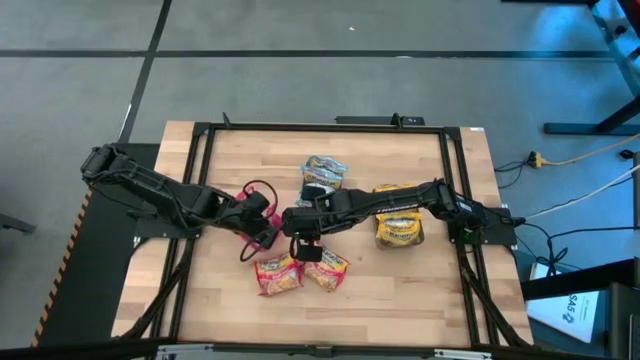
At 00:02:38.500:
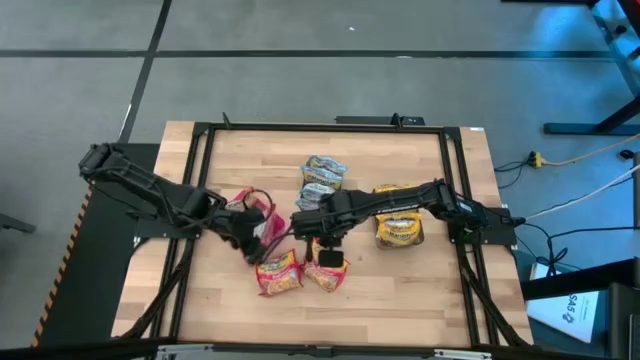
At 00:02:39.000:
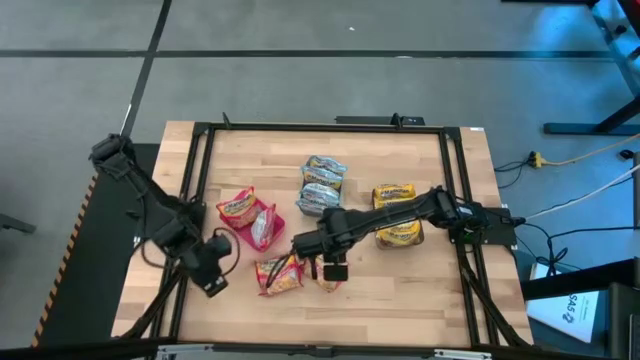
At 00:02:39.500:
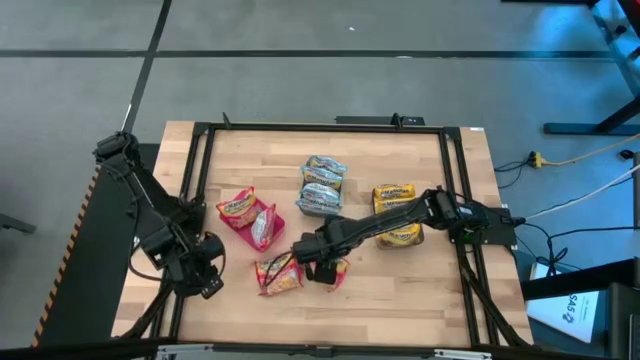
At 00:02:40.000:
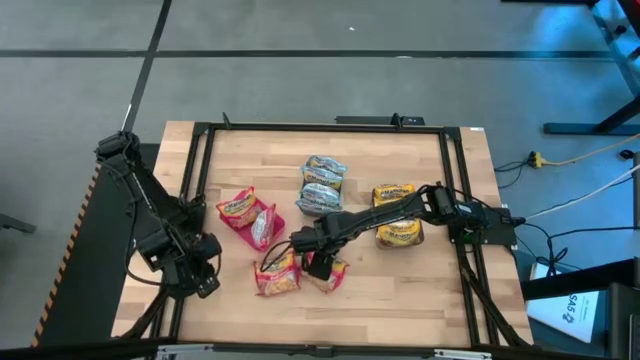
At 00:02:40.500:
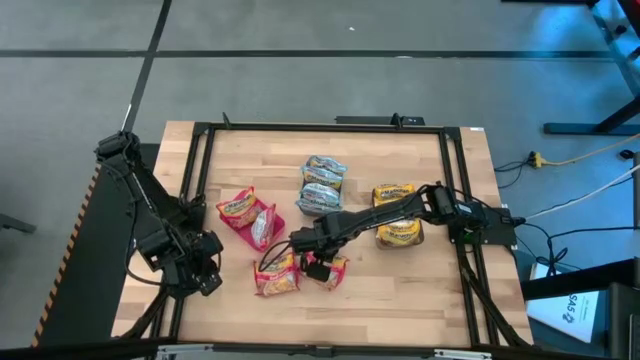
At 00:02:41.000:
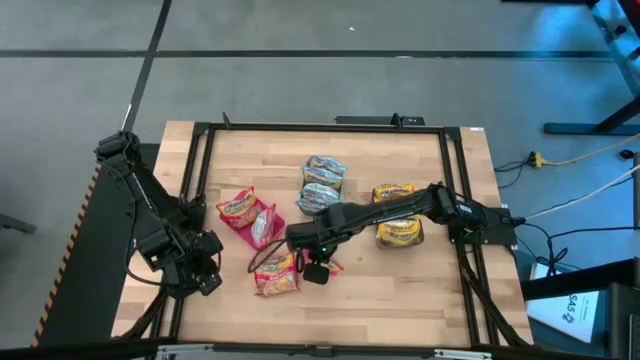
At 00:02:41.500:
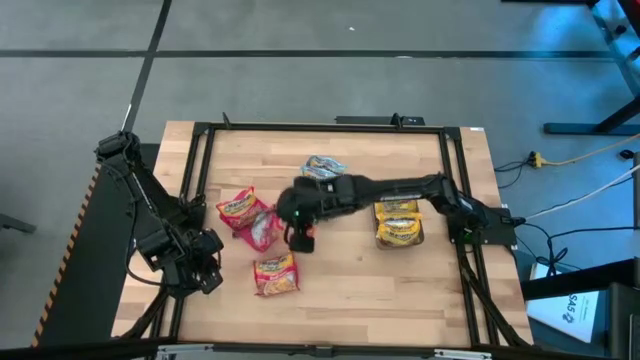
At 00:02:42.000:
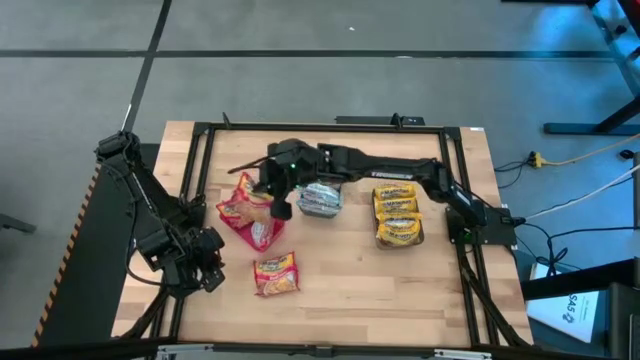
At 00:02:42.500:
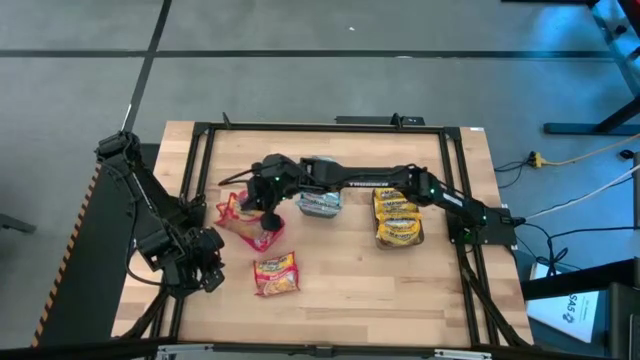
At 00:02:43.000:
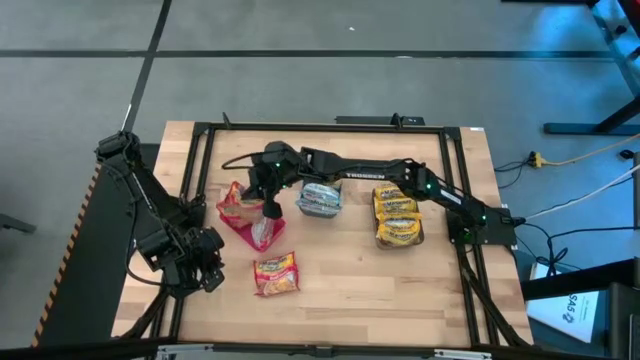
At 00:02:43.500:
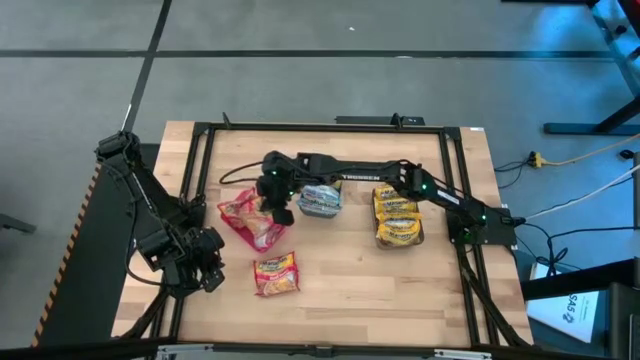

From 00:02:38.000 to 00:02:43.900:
Task: Sort Maruchan noodles
Put the red noodle pack into the red bin

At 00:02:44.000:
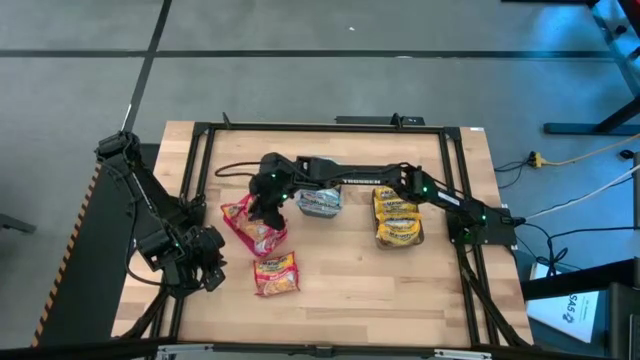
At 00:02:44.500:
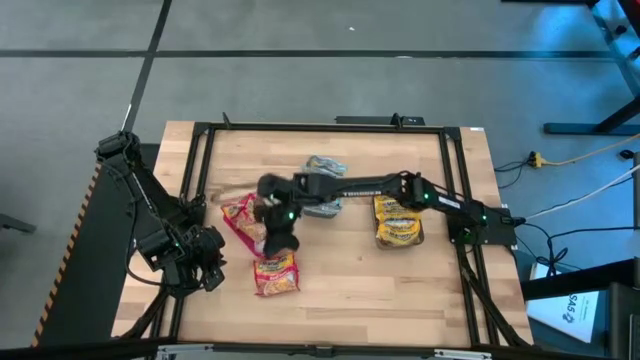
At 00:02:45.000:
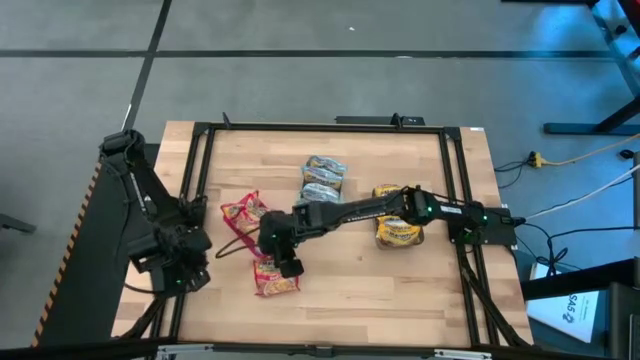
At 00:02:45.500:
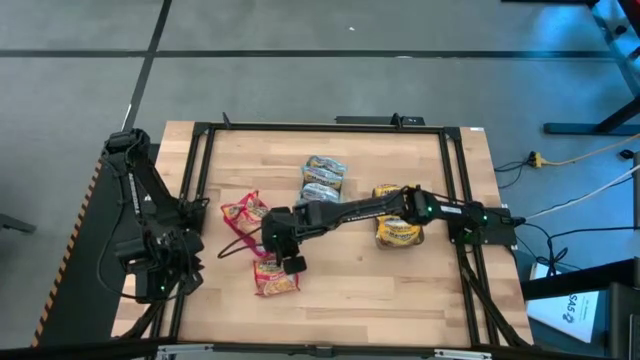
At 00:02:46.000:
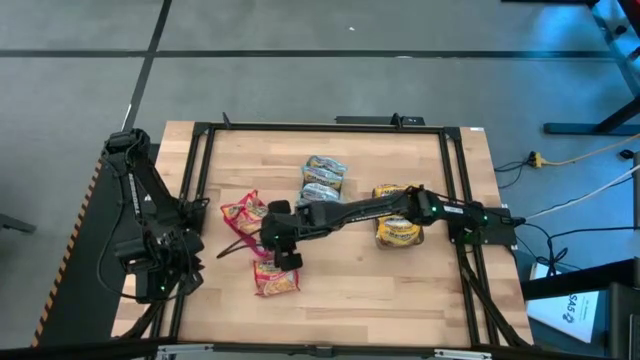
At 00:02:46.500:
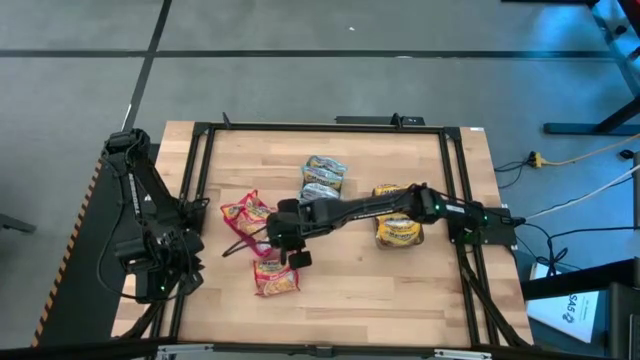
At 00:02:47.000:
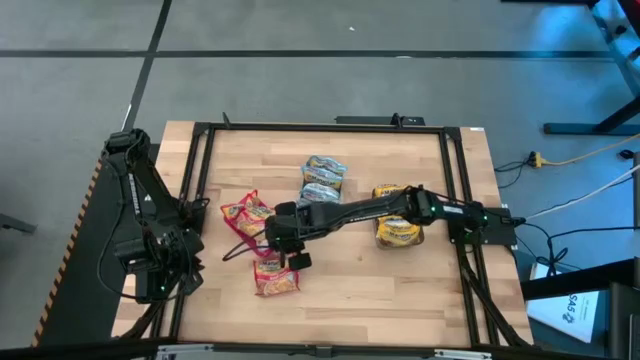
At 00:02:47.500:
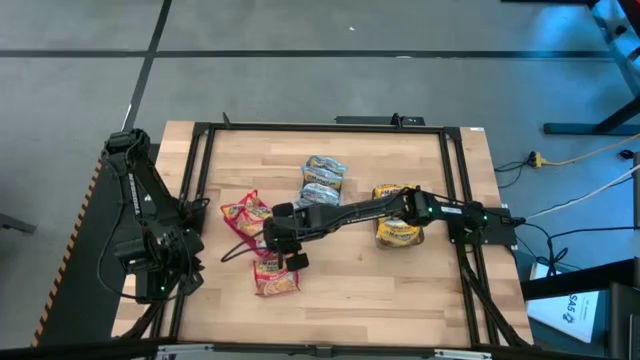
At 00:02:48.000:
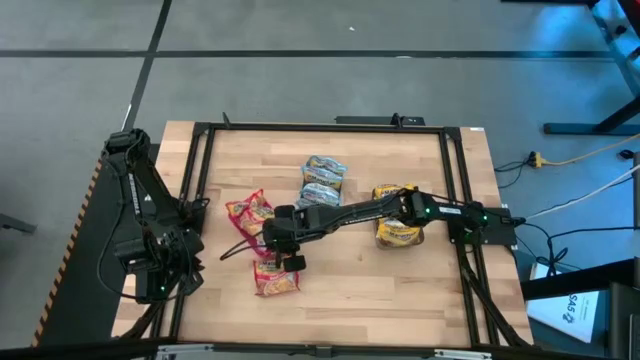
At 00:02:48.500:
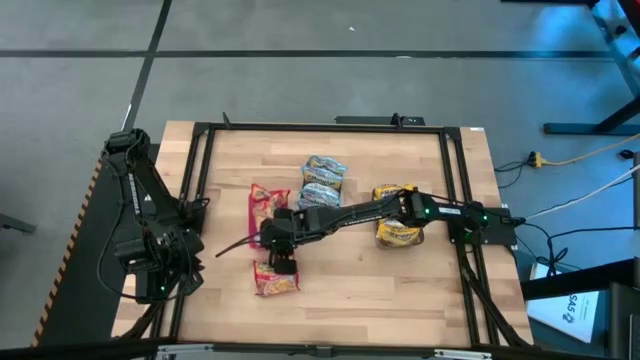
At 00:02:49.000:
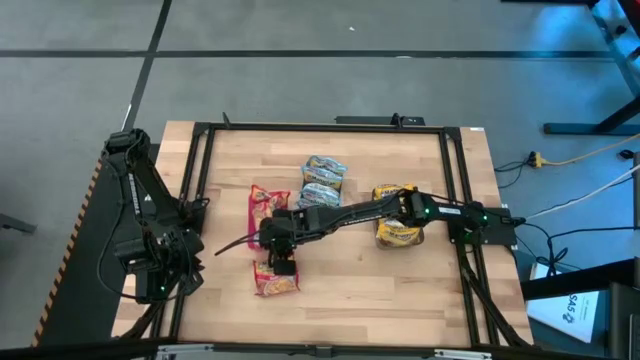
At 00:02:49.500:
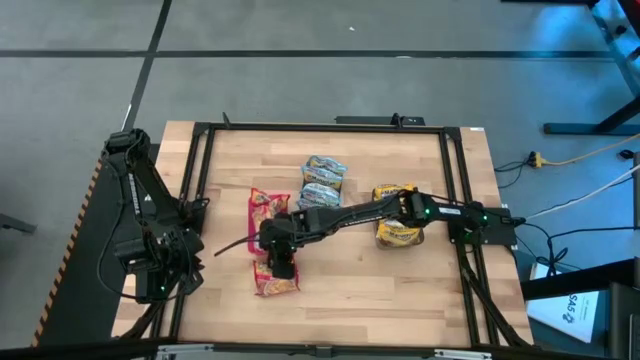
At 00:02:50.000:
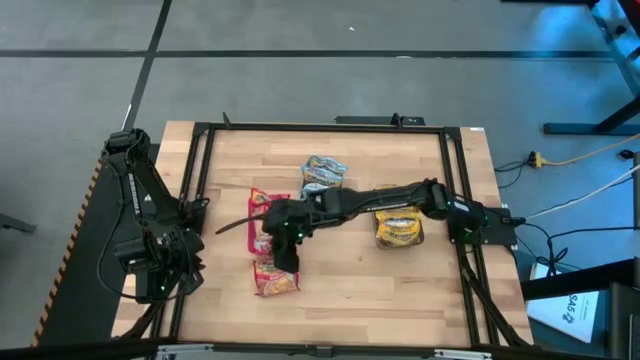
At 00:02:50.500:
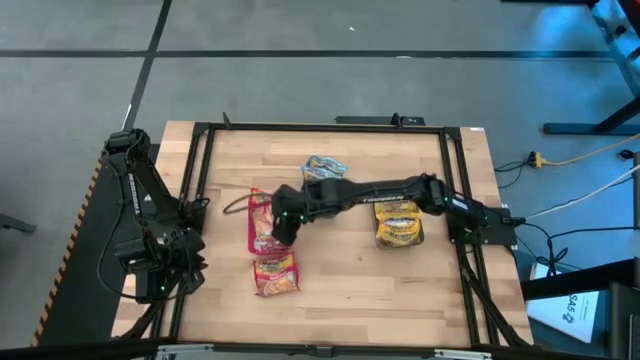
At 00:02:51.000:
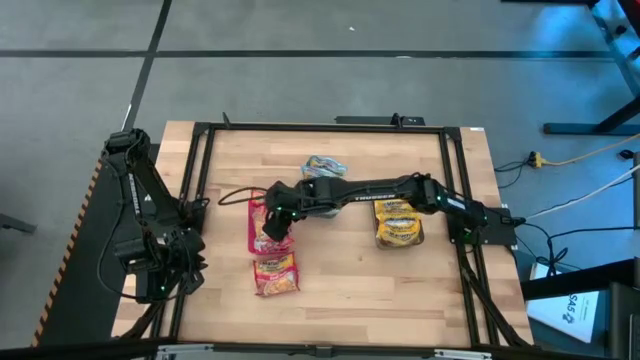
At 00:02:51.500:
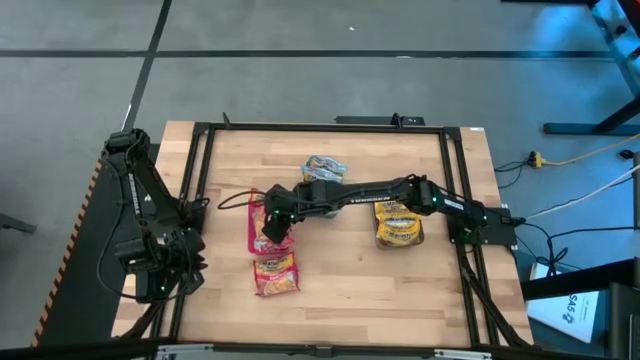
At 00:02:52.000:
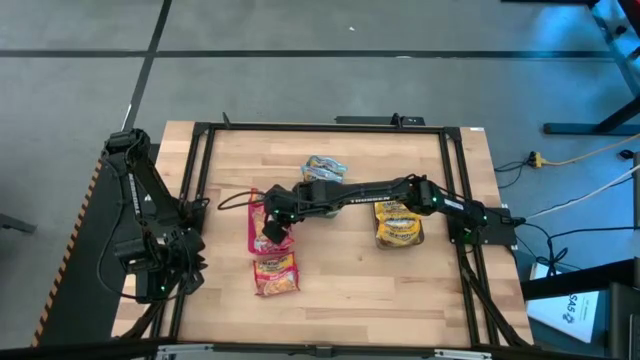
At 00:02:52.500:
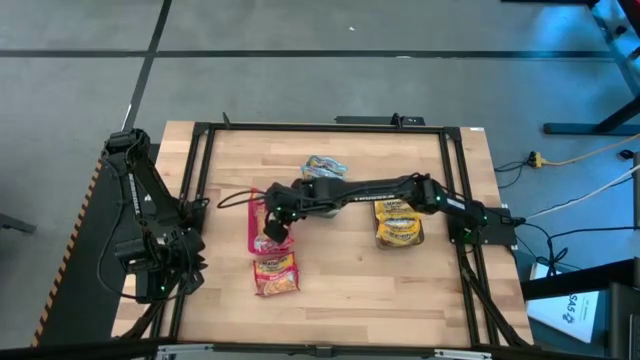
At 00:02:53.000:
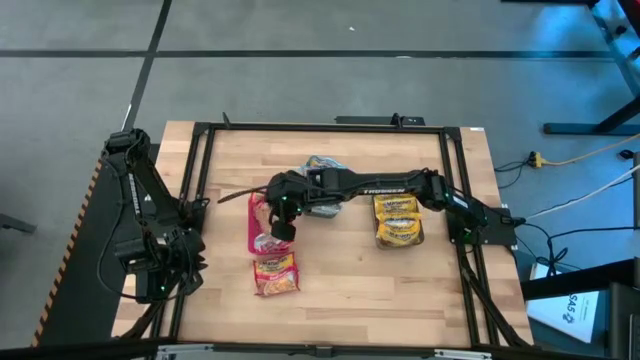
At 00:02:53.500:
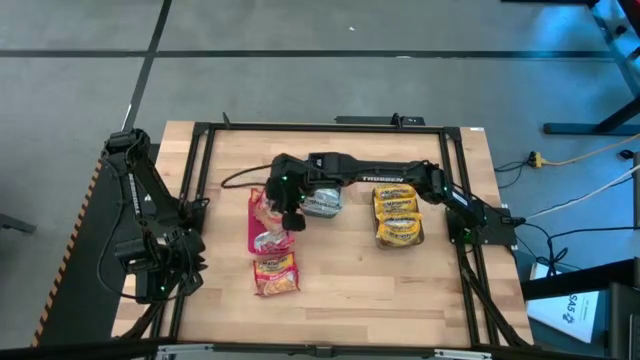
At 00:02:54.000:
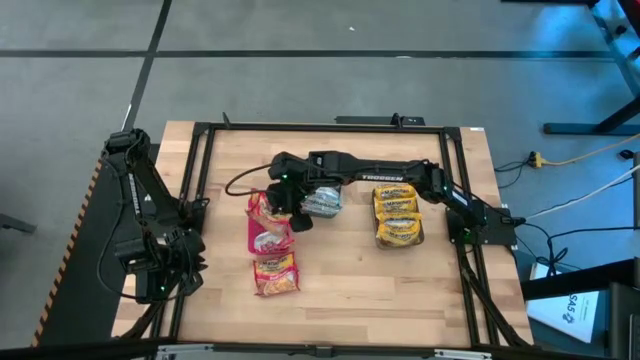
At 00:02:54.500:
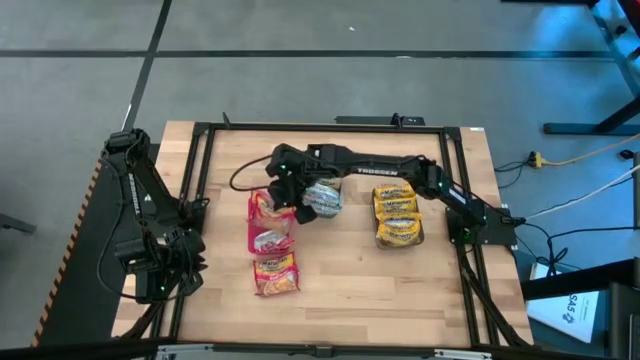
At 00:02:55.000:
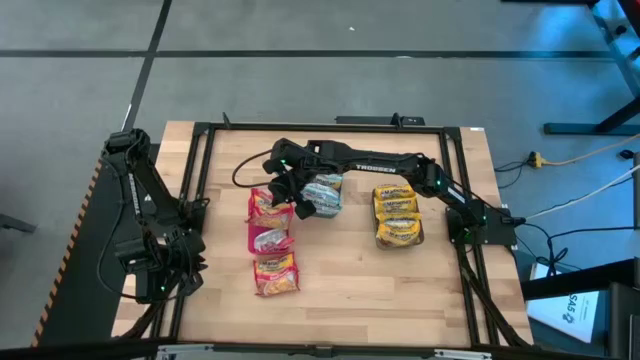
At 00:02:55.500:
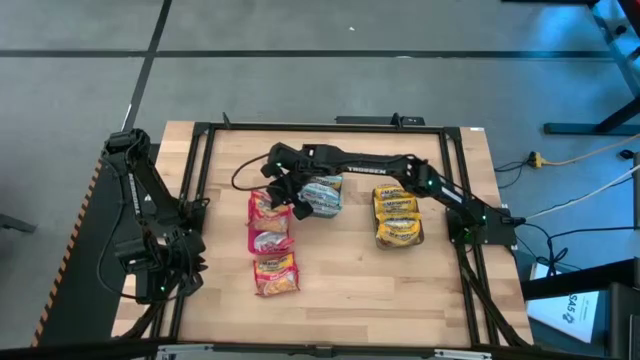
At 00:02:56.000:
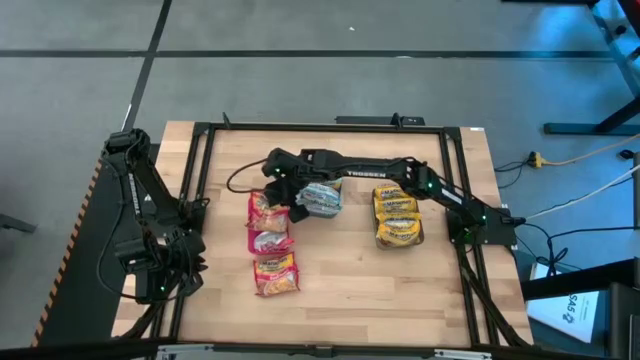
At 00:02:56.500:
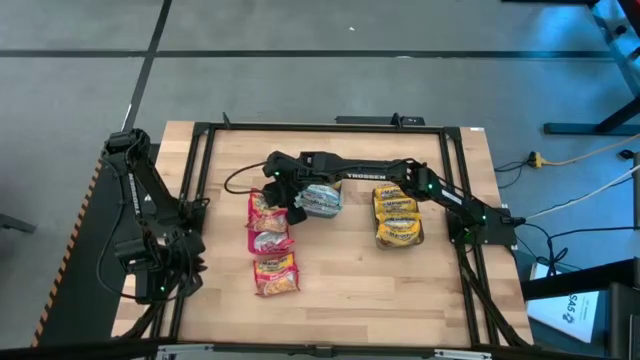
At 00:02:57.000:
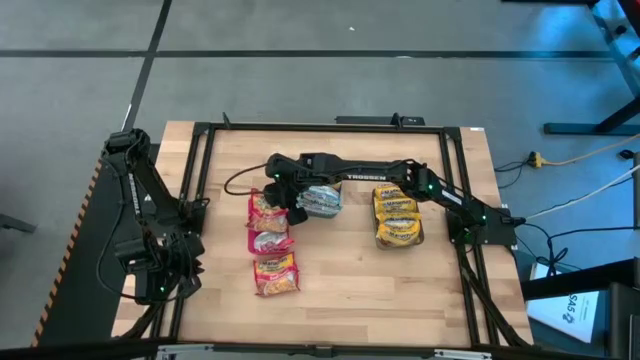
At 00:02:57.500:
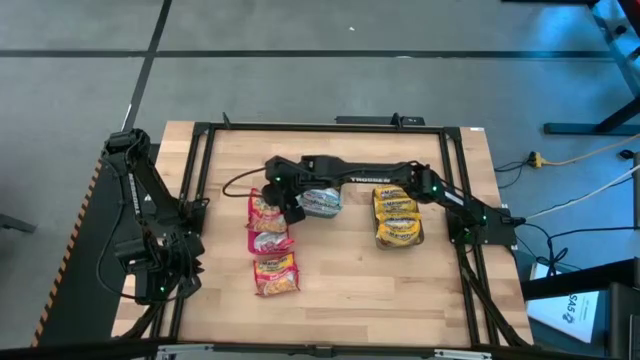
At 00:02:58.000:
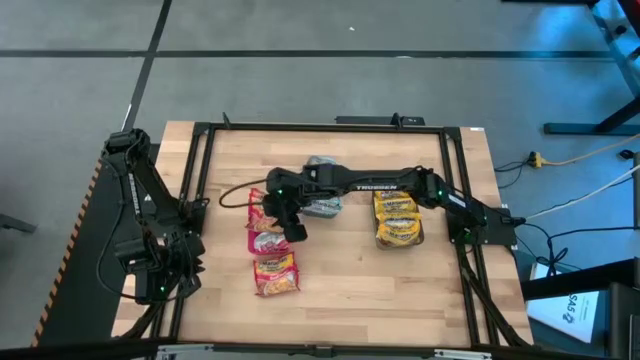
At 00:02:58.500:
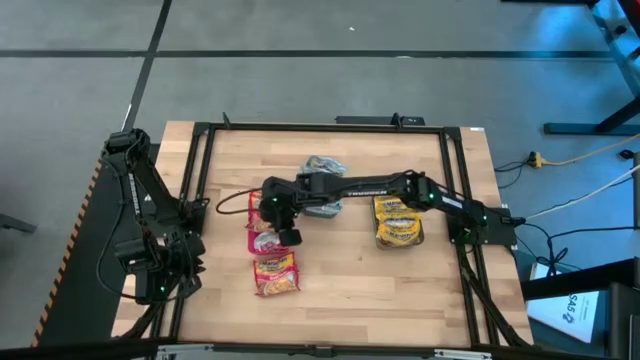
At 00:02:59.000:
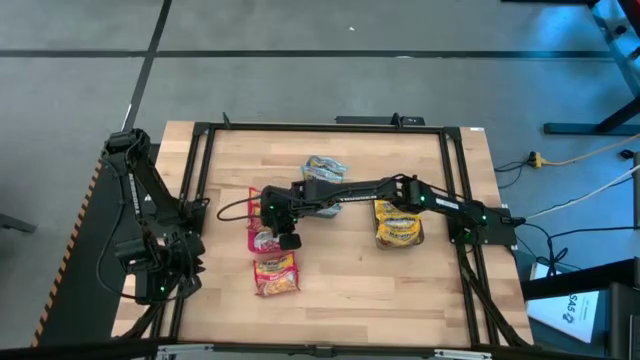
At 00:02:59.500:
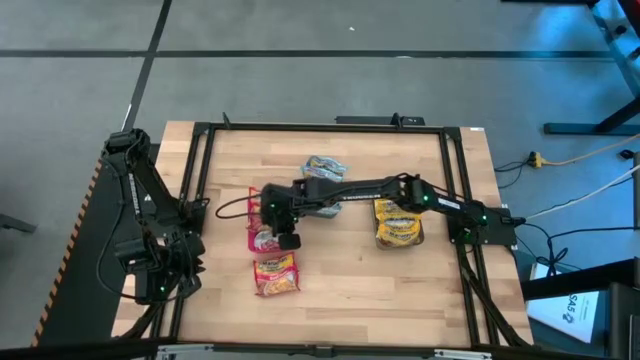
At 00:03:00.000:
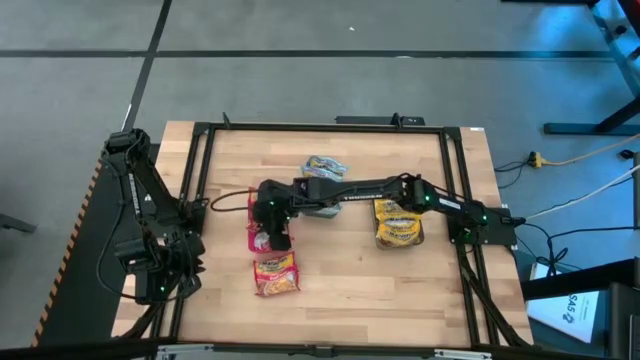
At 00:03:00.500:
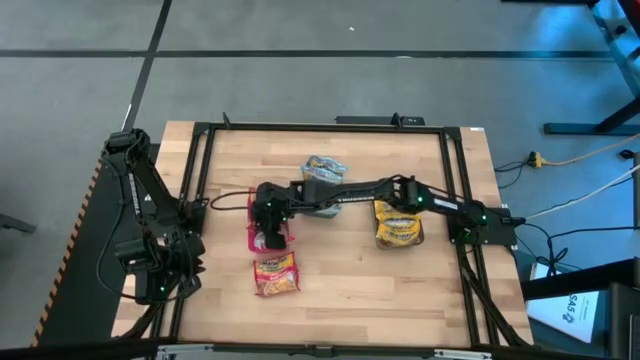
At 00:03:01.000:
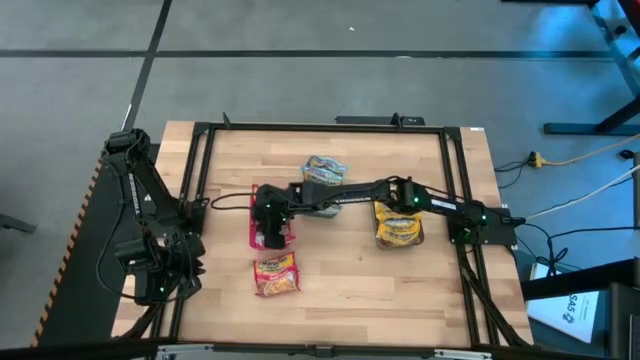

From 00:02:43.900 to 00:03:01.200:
Adjust the red noodle packs in the red bin
